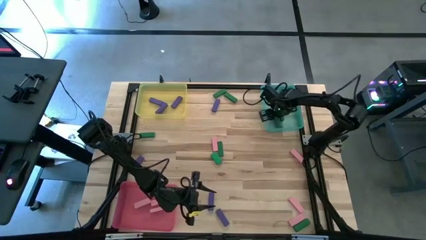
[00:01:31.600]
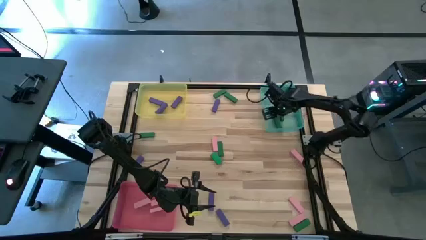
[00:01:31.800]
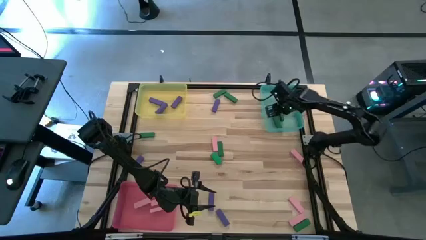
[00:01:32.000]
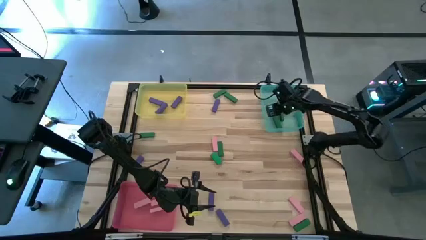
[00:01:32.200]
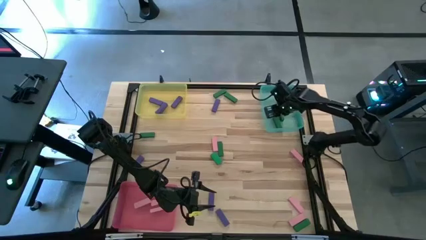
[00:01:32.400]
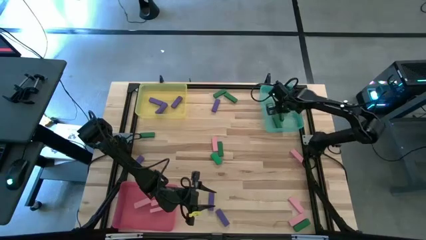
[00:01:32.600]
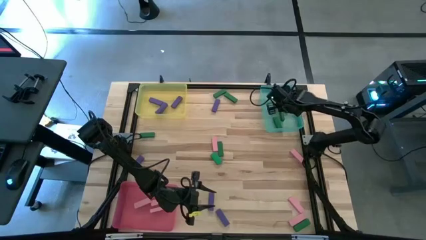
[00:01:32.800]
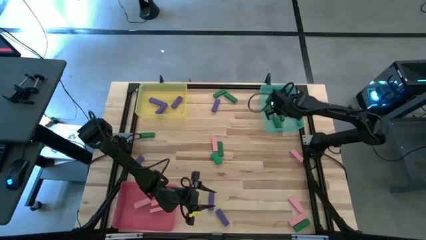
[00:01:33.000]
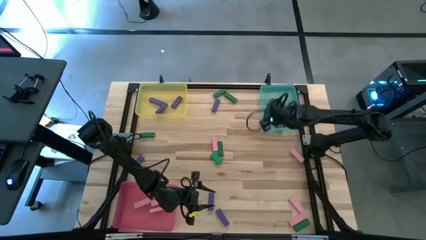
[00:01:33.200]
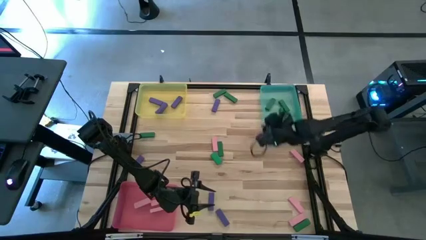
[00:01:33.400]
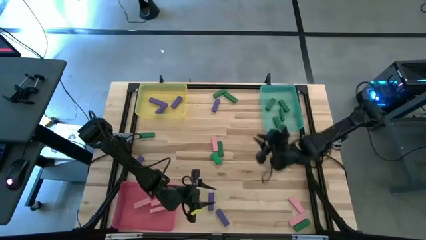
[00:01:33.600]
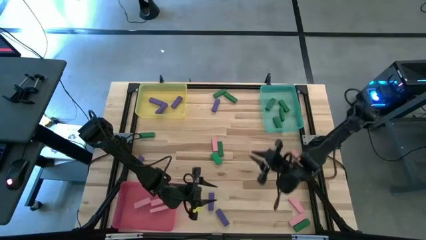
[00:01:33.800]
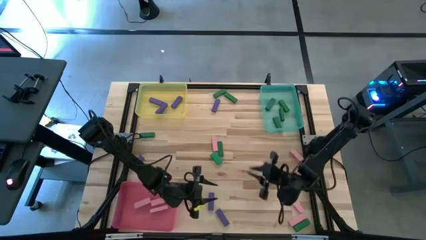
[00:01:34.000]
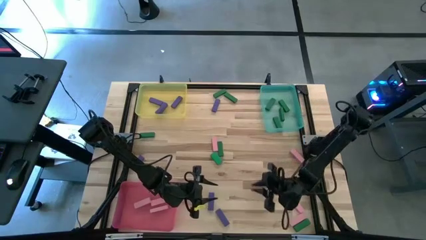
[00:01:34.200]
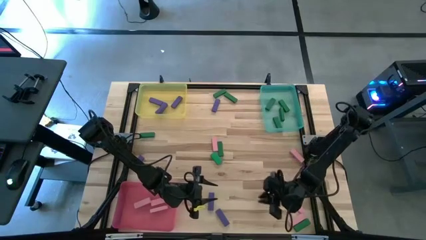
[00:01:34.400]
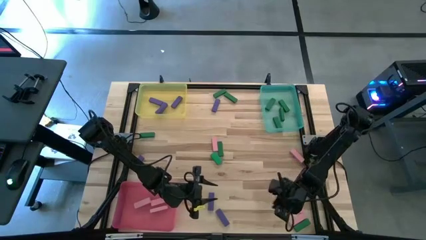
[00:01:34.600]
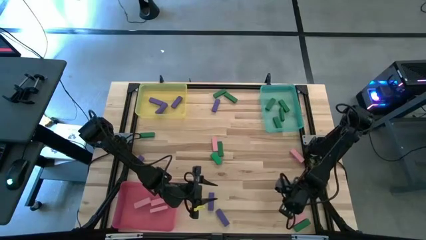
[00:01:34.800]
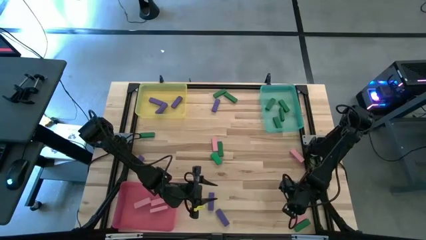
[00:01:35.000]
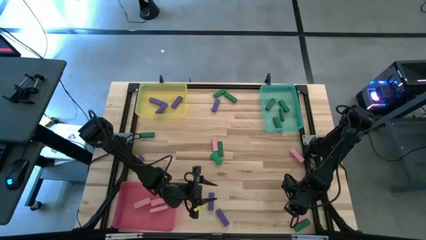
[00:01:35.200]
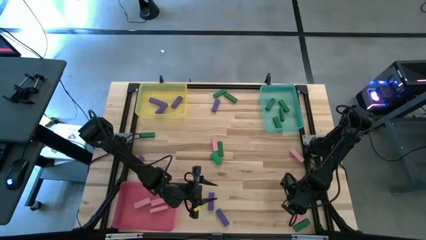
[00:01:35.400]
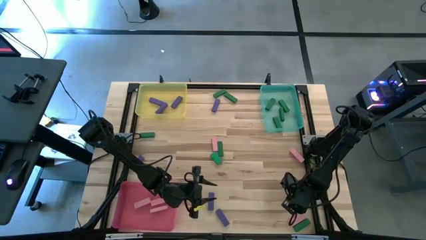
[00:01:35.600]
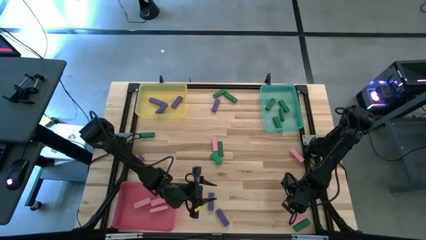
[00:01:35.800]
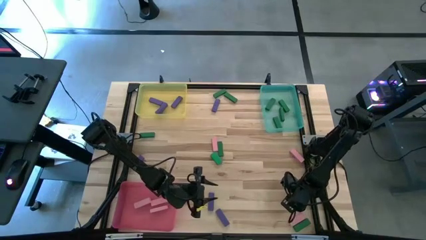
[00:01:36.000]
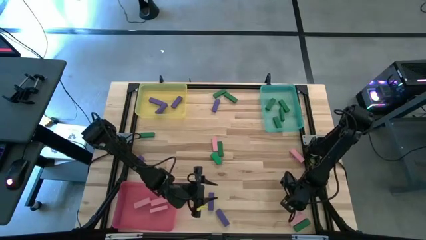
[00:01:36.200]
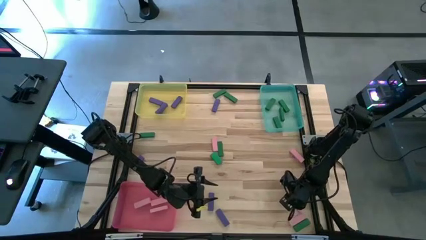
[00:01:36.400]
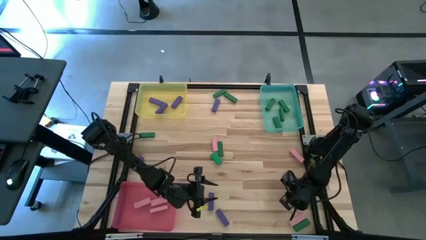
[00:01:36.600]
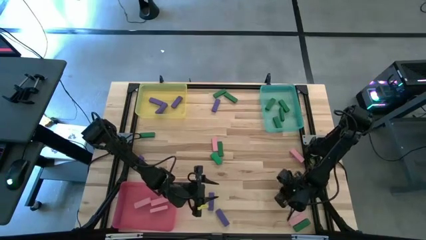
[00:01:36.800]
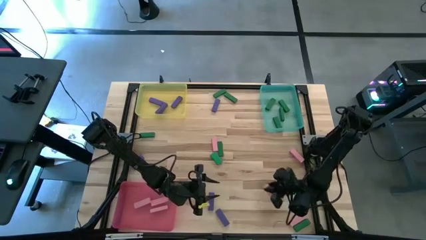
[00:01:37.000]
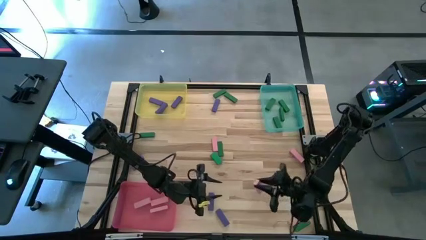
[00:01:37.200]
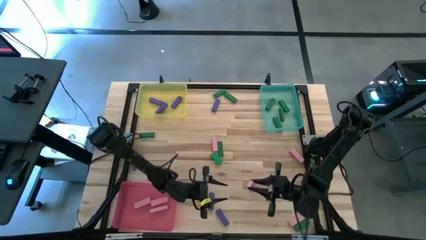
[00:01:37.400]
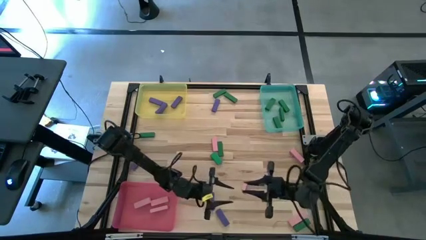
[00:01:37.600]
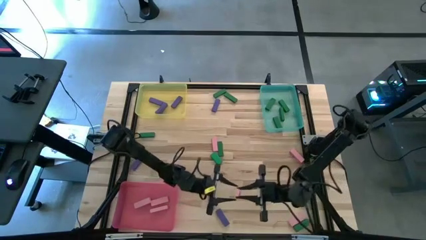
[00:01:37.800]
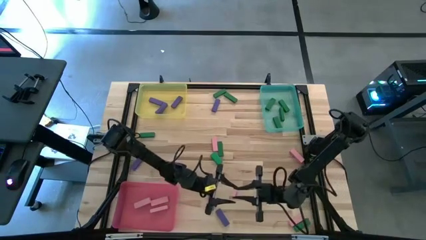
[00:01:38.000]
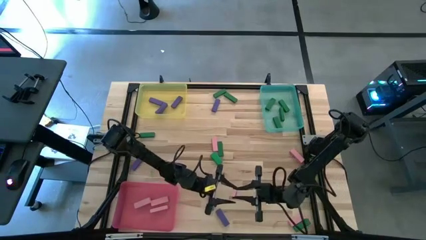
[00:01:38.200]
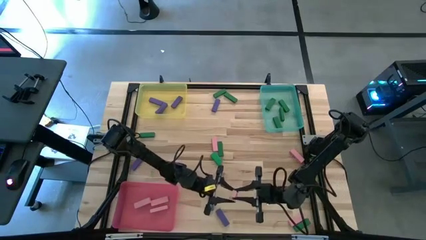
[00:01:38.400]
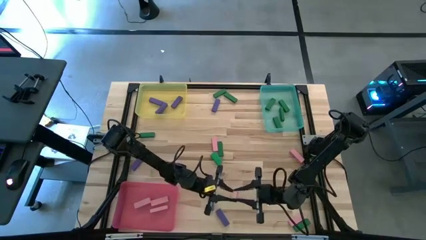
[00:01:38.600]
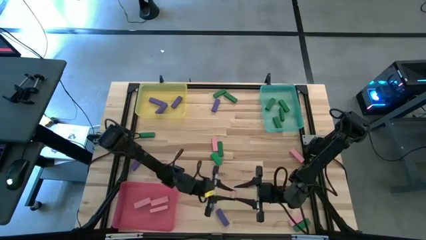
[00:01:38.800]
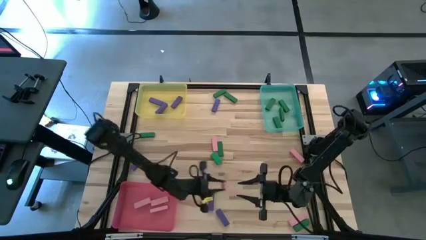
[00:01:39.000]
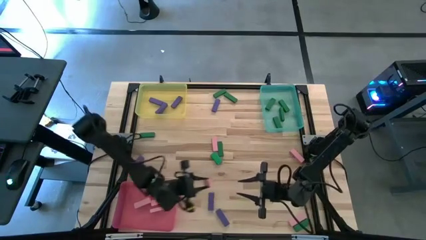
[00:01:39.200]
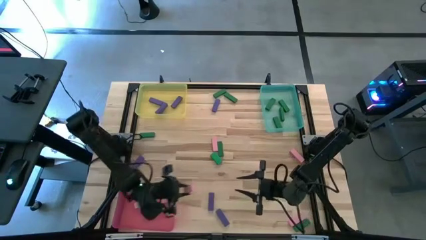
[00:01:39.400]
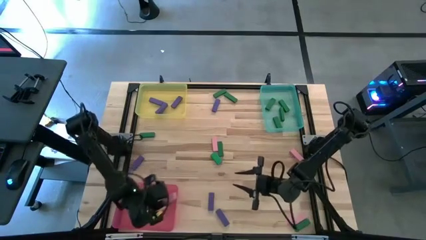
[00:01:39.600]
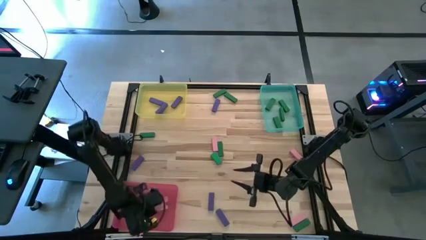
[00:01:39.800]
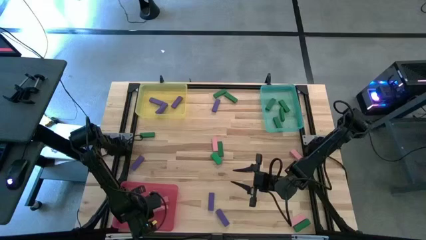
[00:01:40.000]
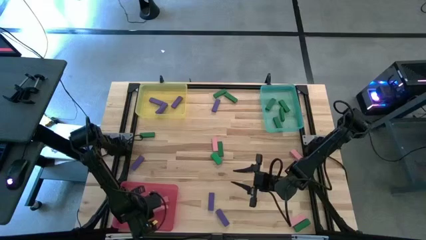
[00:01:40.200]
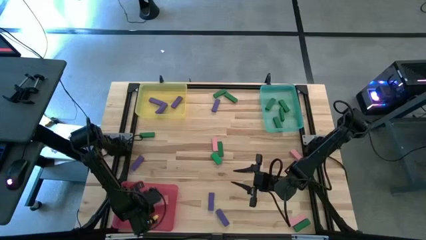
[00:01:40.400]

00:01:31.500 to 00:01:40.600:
Task: Sort blocks
Put the pink wooden block into the pink bin

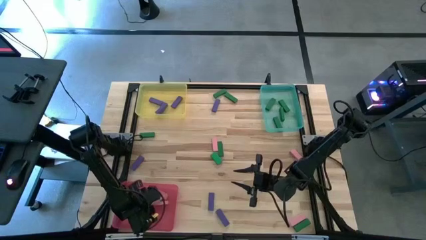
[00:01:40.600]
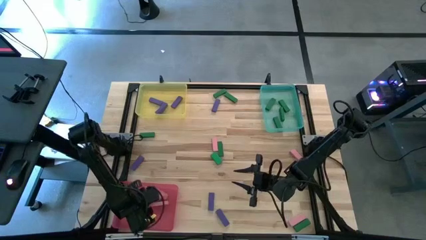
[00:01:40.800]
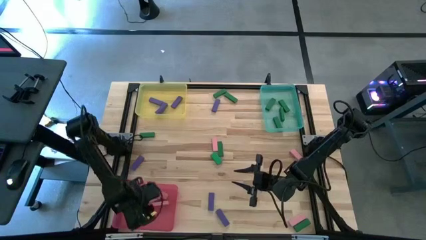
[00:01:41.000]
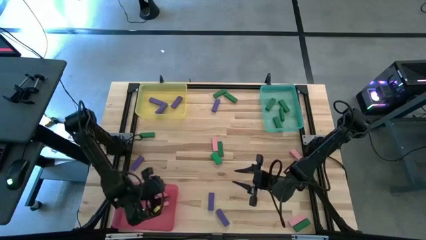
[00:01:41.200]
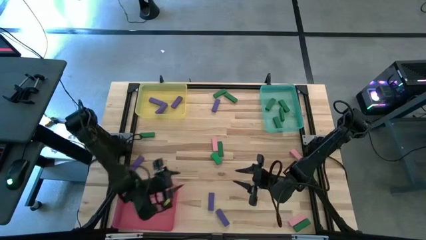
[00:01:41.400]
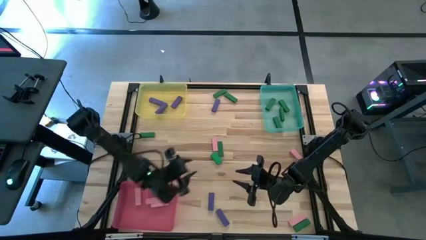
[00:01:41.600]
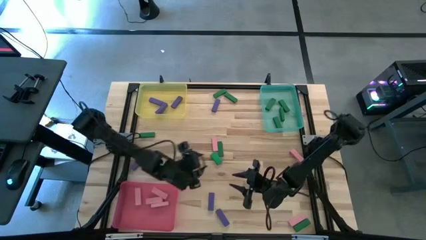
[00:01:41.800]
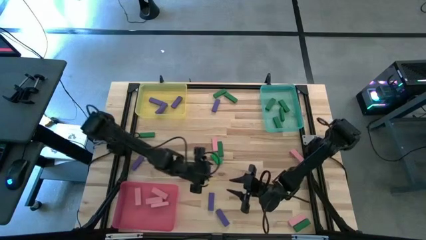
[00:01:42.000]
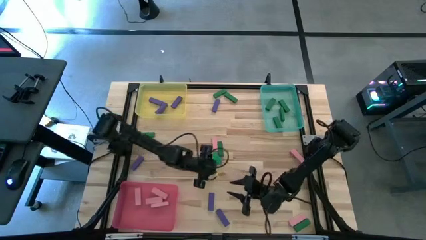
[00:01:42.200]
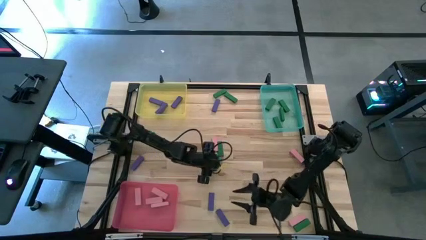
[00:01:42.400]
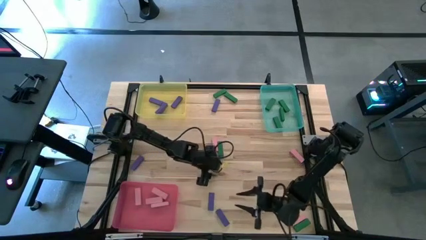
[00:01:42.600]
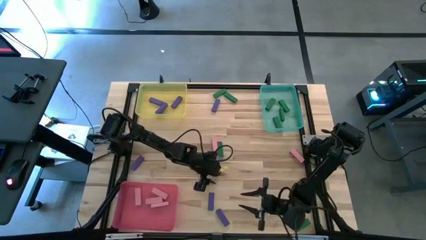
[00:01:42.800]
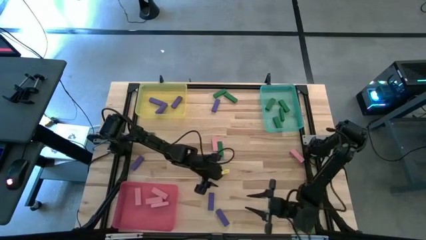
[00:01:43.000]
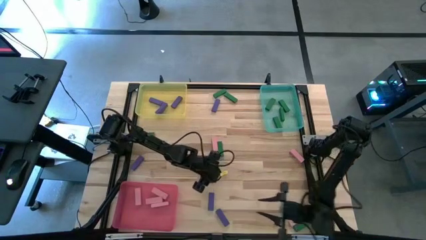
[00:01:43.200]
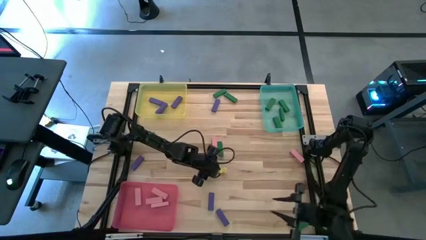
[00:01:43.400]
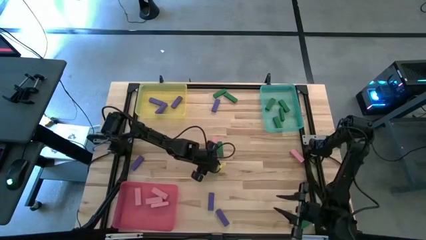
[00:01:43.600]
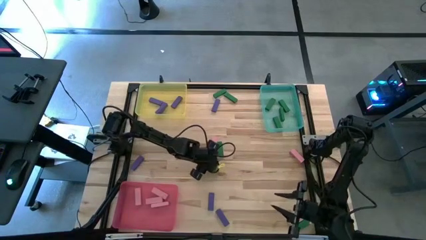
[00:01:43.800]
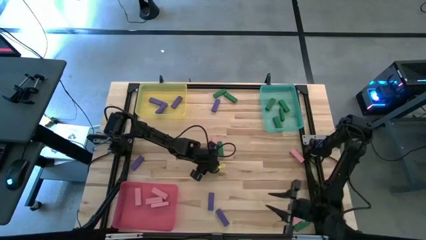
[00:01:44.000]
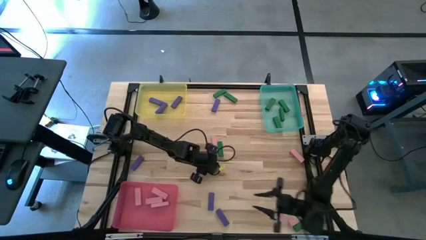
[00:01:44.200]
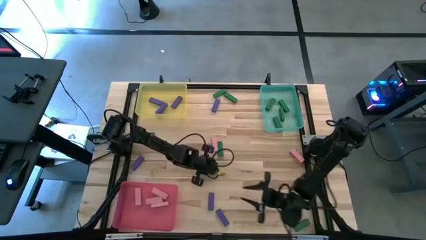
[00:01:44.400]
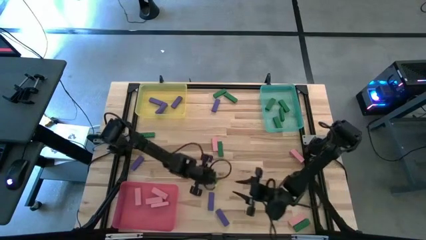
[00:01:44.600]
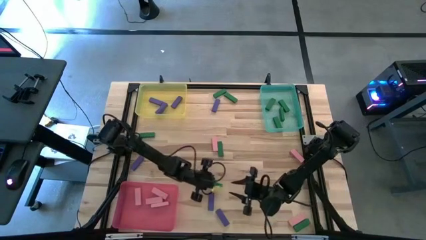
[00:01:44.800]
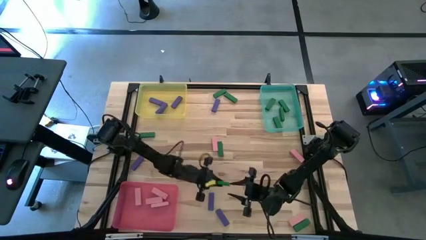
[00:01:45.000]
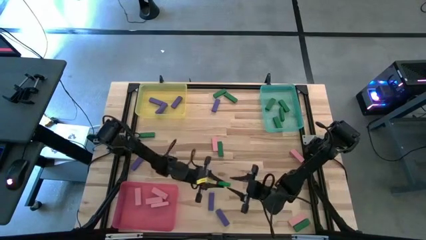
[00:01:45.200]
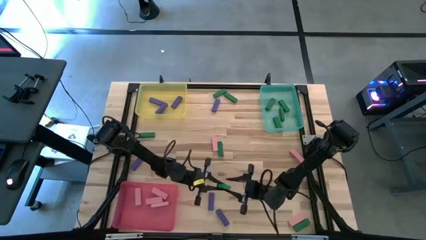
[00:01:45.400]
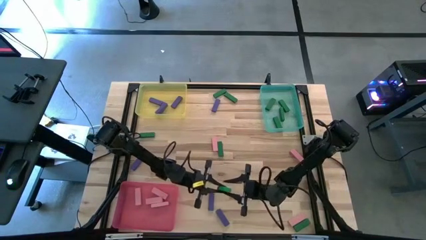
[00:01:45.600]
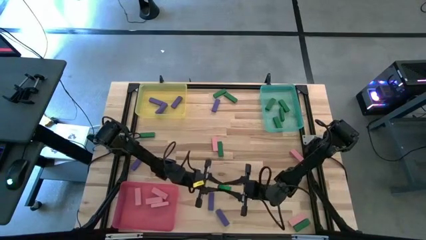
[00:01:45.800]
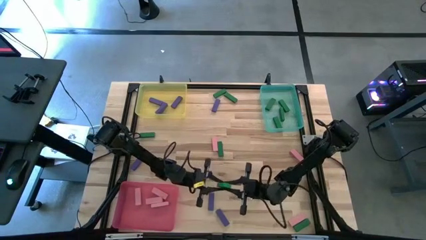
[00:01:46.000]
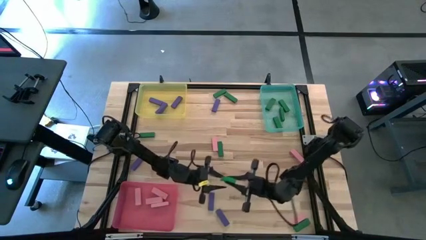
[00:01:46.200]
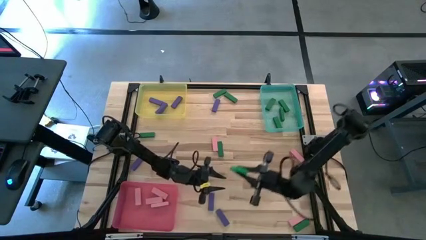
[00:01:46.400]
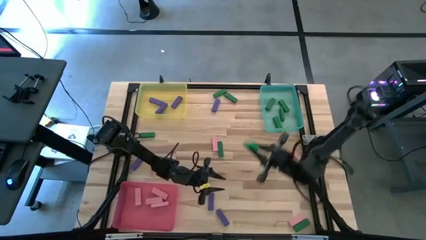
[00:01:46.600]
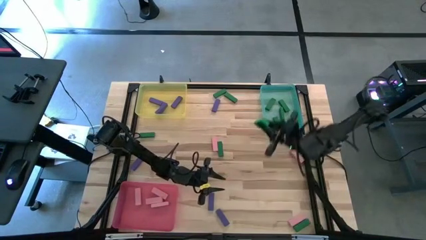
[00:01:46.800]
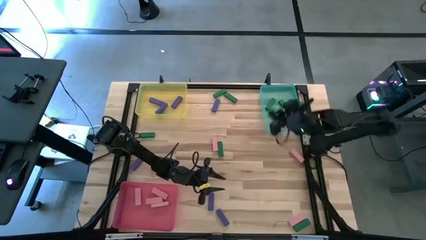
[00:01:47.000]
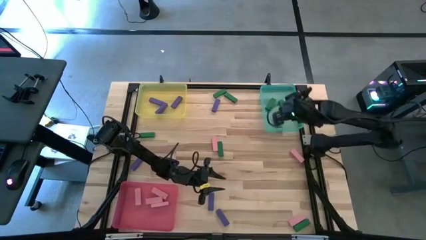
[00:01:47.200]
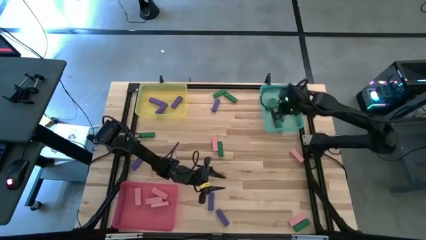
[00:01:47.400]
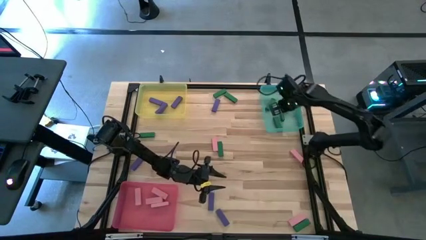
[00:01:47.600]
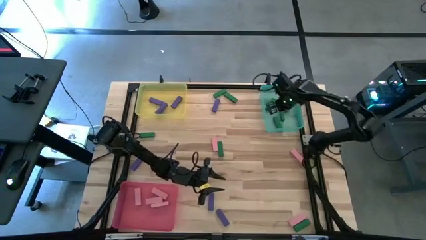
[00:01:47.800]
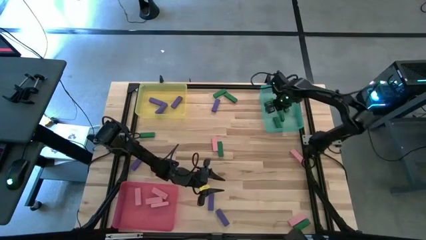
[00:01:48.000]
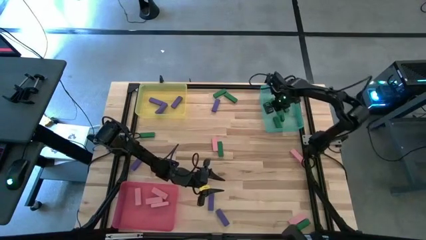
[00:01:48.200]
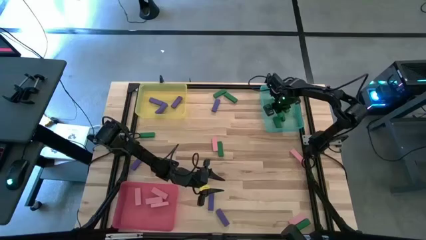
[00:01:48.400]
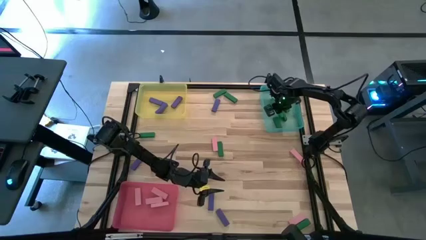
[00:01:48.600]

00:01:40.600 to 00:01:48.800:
Put the green wooden block into the green bin
